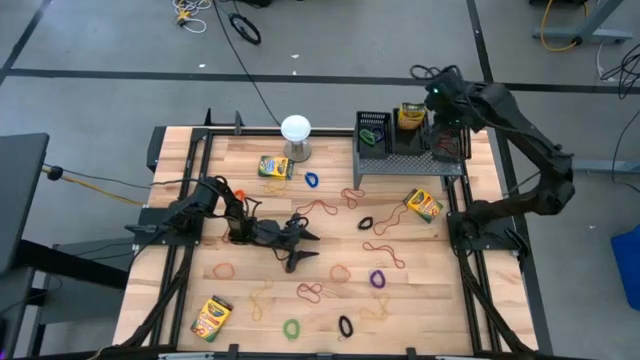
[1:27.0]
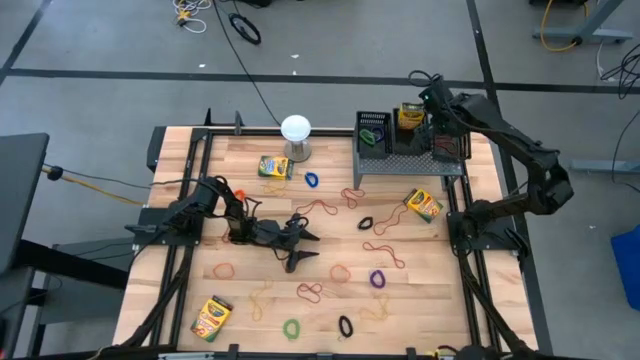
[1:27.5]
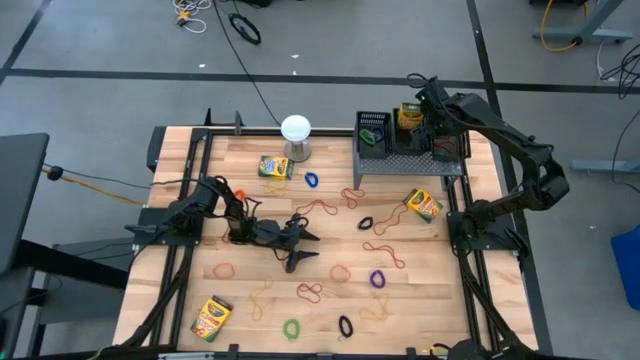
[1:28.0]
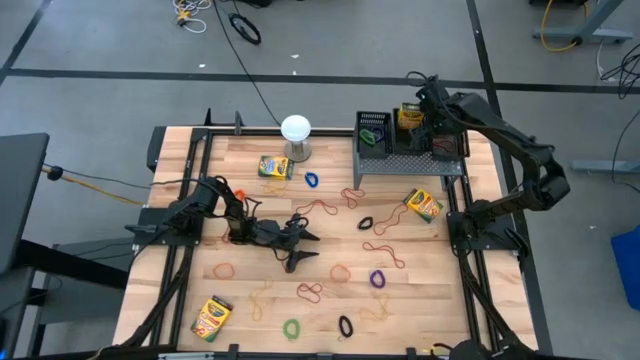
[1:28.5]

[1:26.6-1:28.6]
Task: Pick & Place Office Desk Supplies
Adjust the right black basket on the shelf

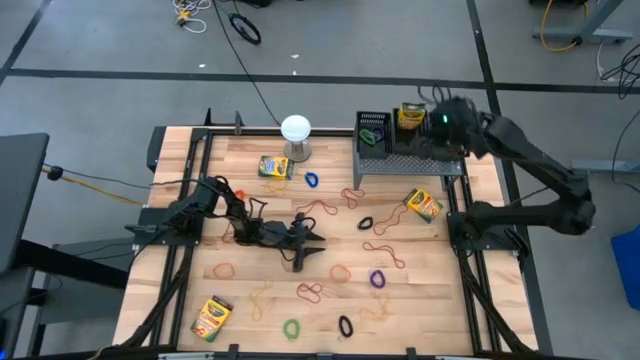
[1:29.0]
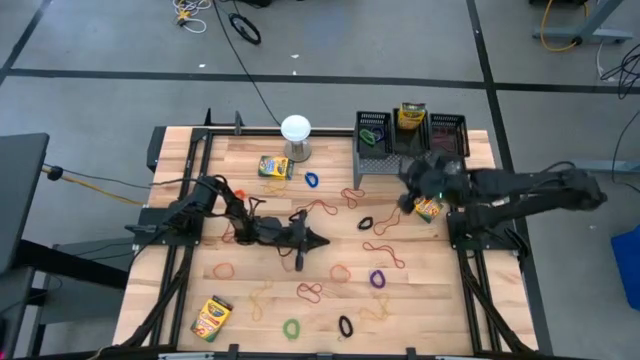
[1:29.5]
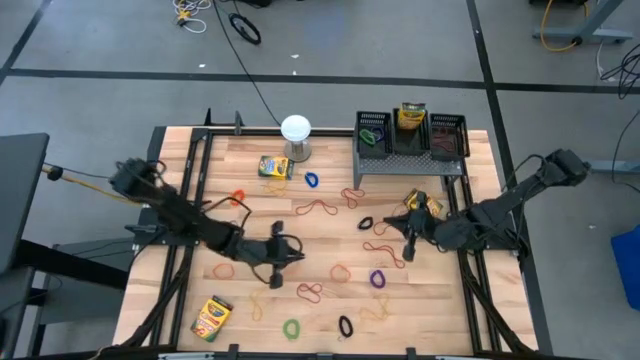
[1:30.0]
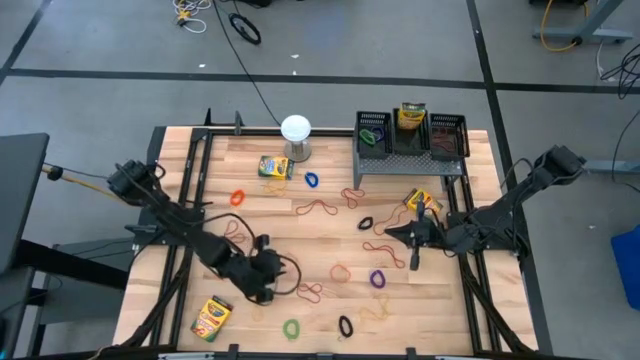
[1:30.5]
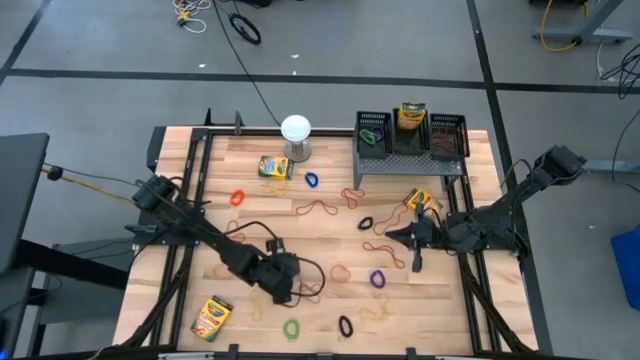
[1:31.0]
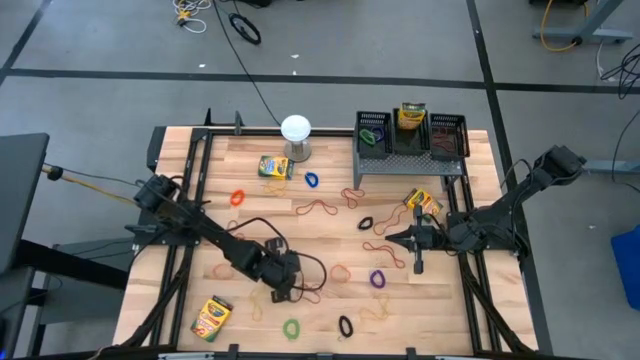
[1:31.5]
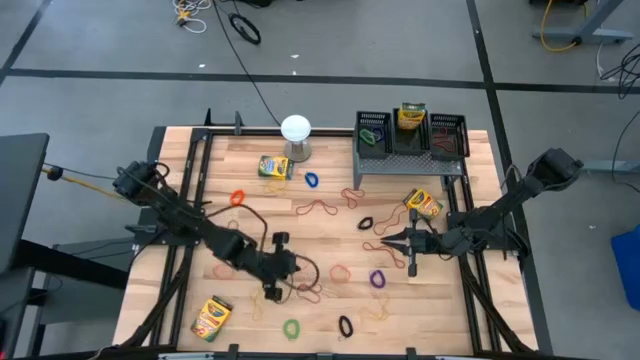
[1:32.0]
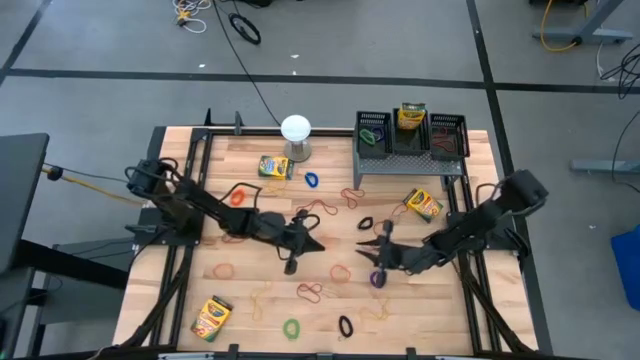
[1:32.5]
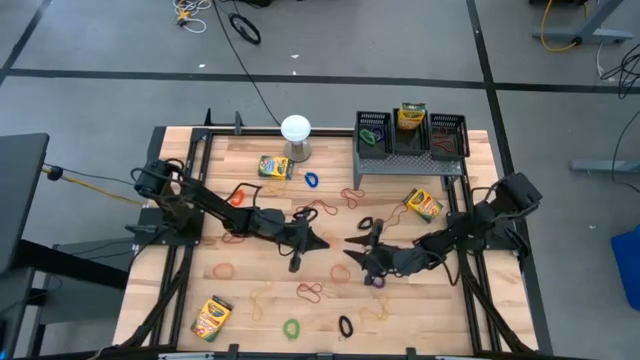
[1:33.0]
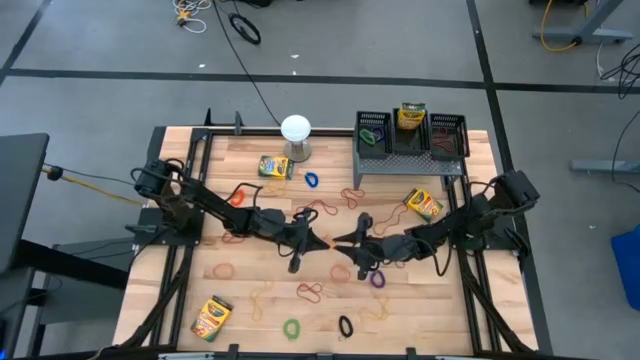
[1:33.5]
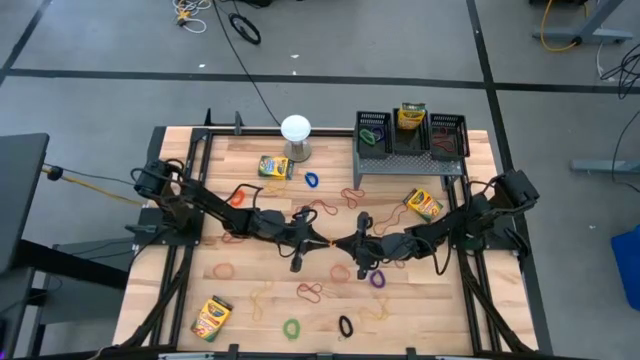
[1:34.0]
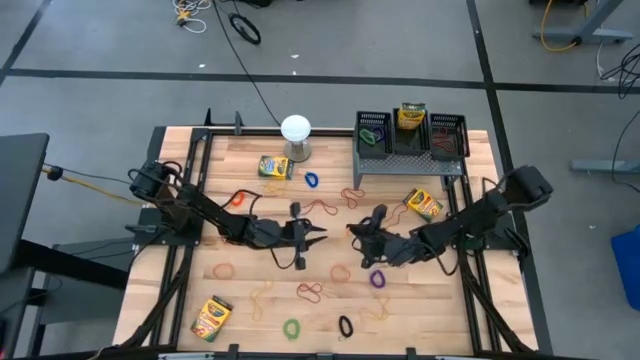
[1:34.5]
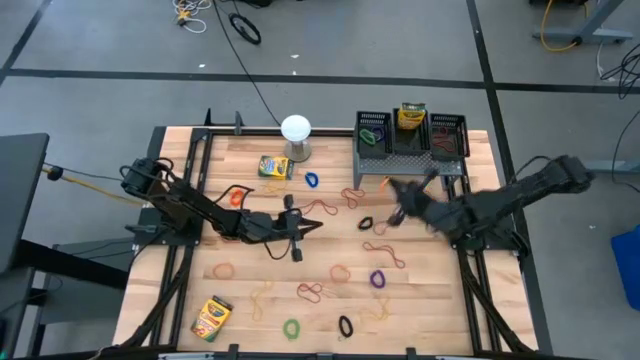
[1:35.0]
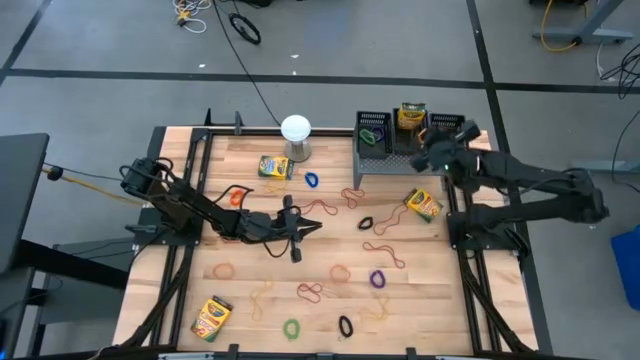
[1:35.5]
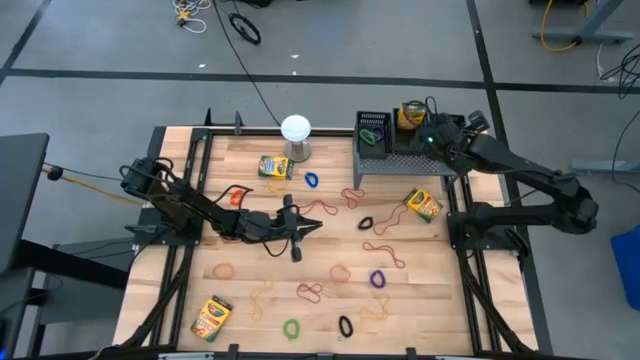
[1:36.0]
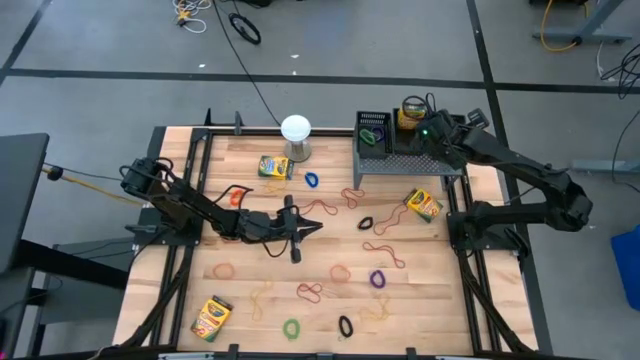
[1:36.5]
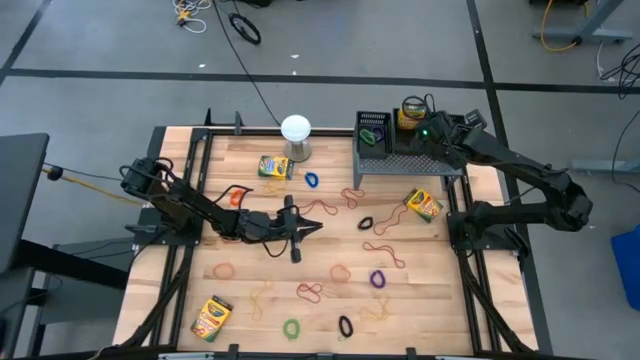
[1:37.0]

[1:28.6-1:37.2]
Put the orange rubberband into the right black basket on the shelf

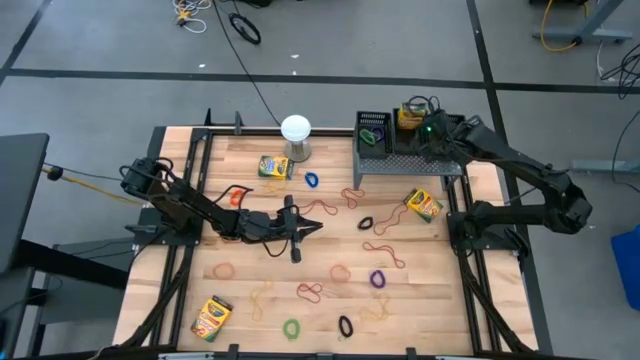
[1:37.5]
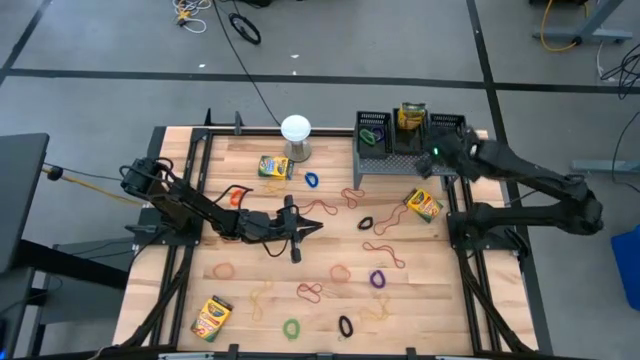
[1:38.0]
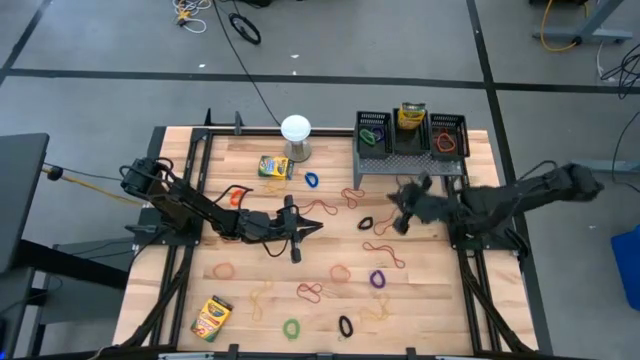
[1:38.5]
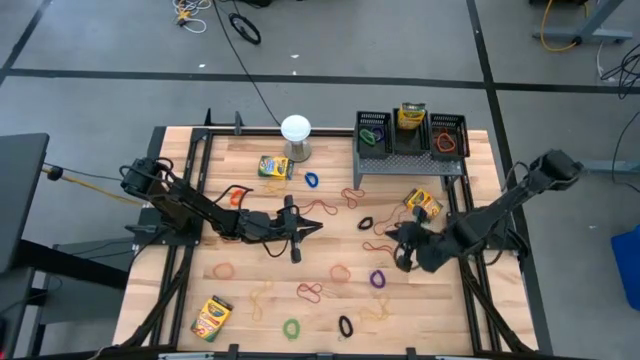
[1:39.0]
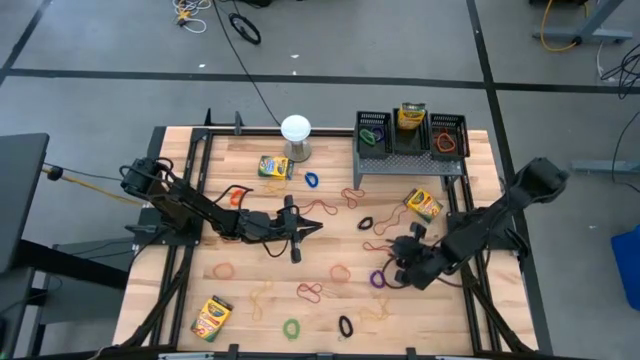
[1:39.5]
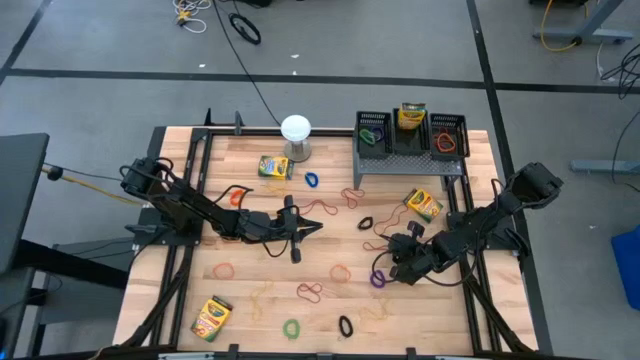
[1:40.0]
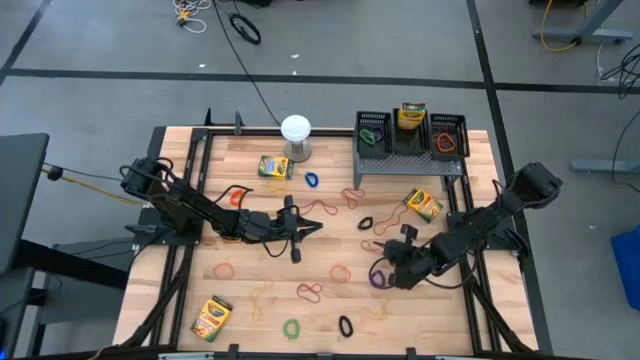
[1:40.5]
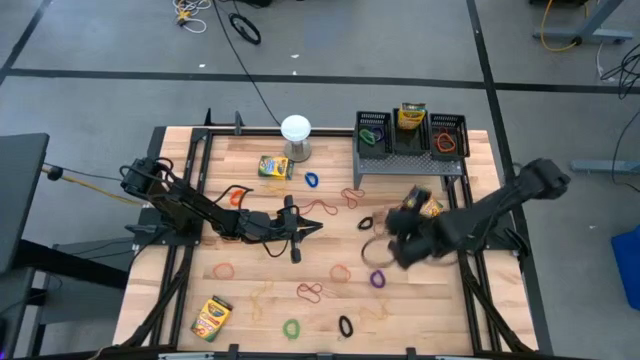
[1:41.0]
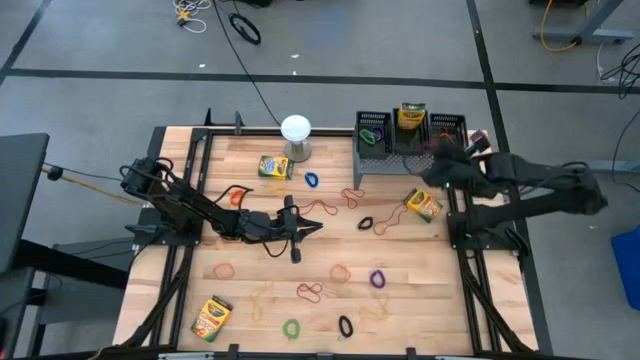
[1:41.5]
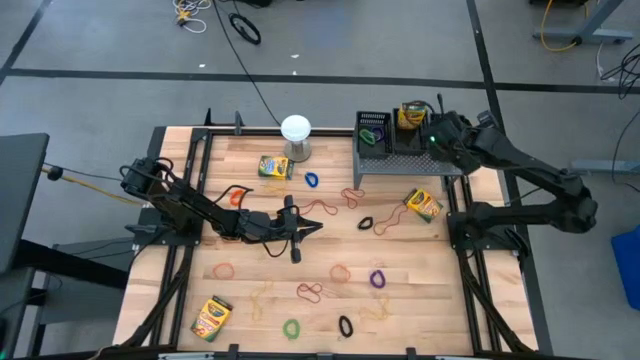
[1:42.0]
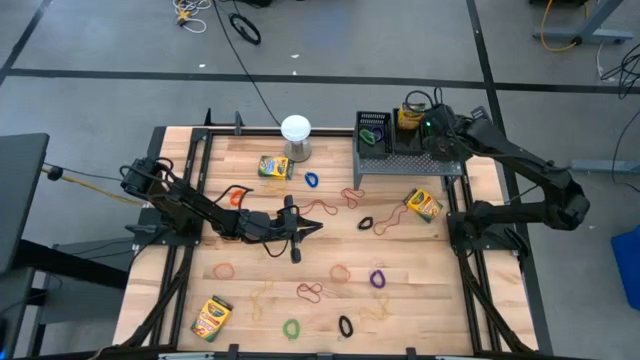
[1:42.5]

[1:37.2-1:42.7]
Put the red rubberband into the right black basket on the shelf

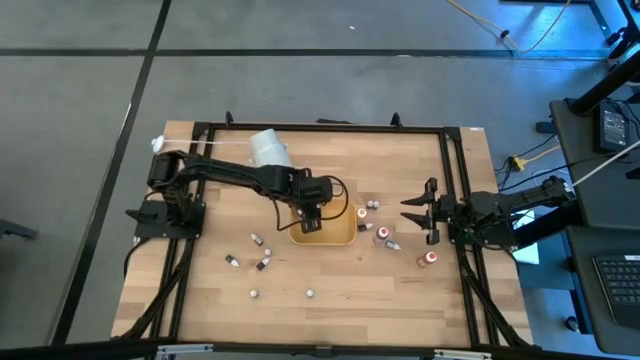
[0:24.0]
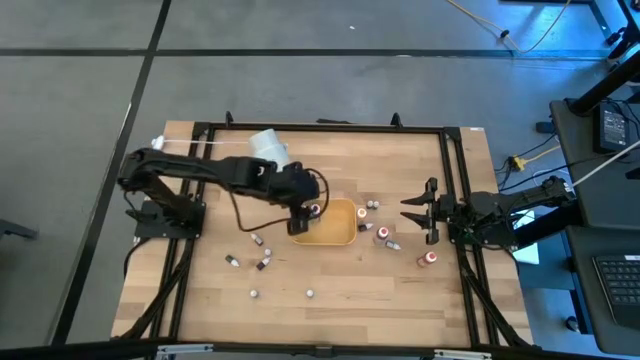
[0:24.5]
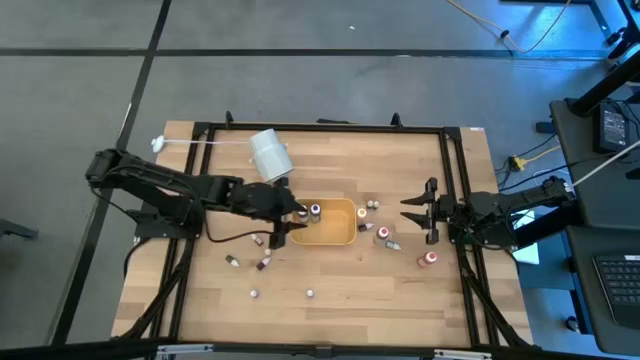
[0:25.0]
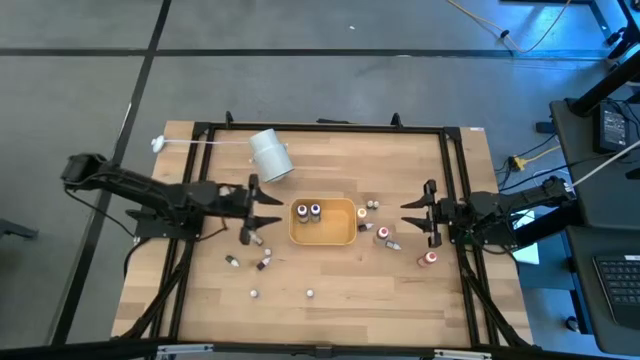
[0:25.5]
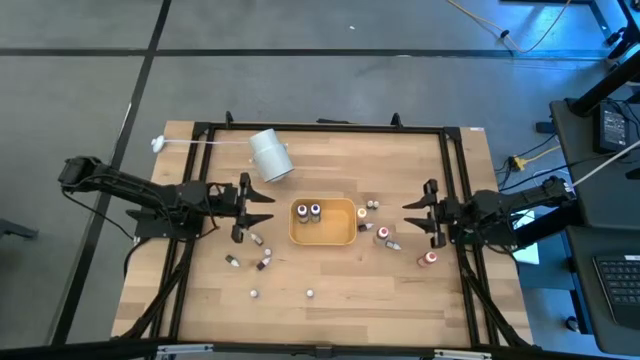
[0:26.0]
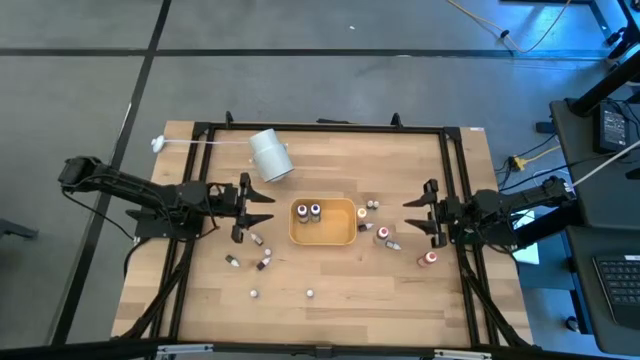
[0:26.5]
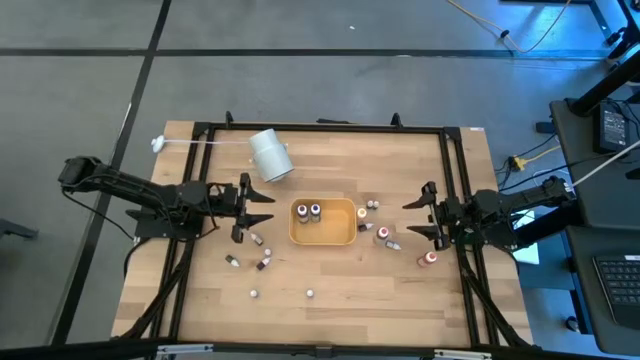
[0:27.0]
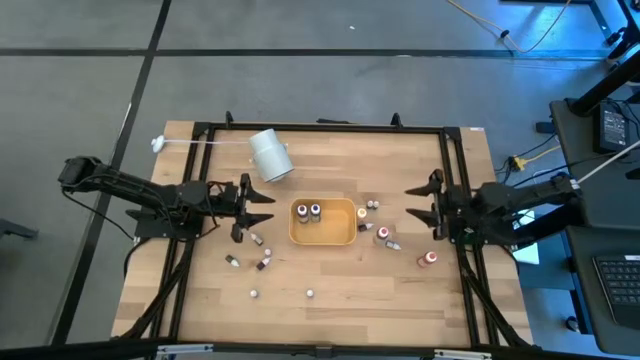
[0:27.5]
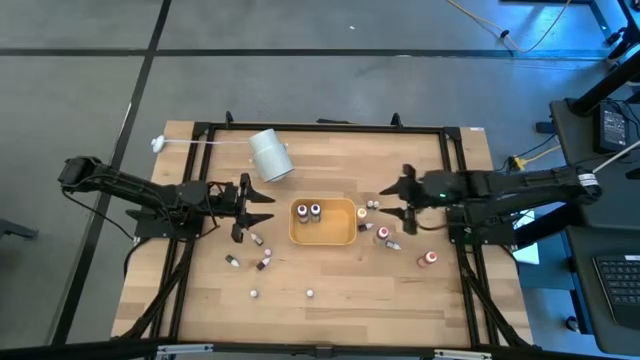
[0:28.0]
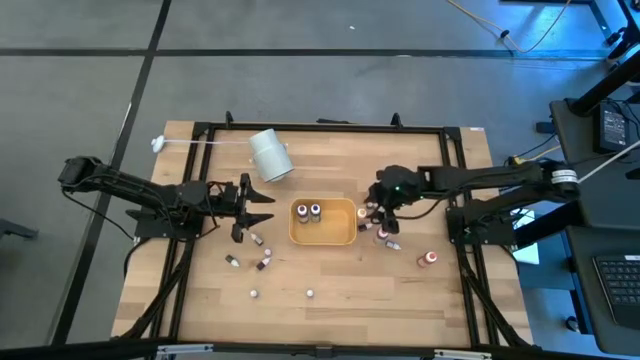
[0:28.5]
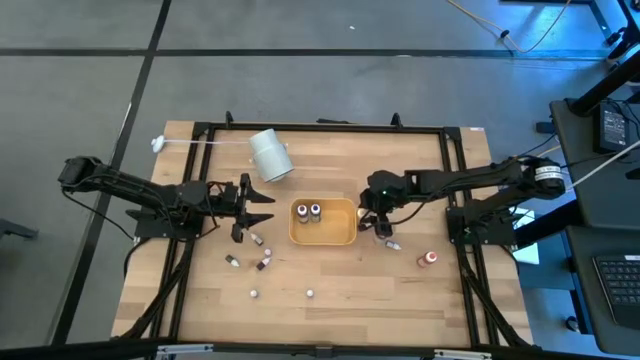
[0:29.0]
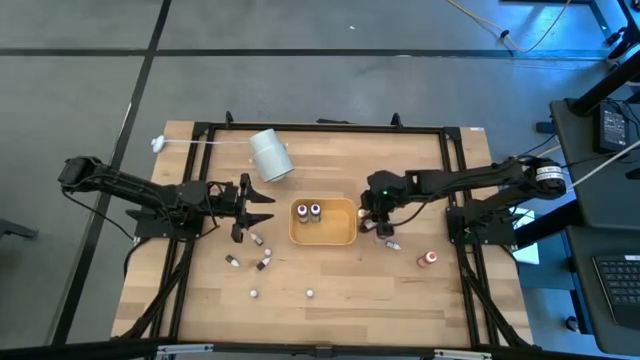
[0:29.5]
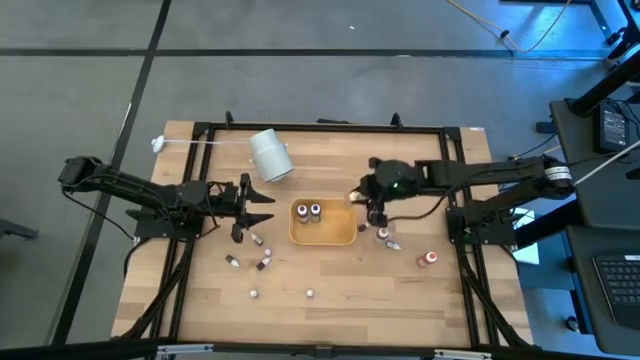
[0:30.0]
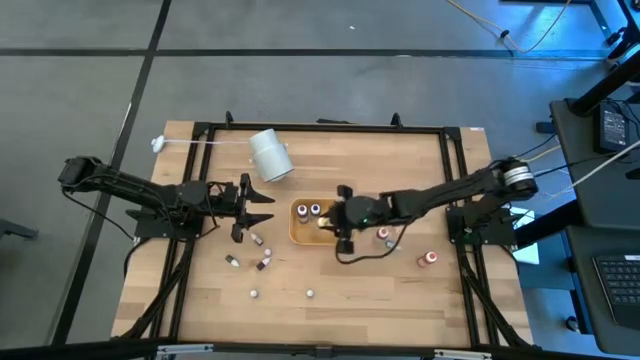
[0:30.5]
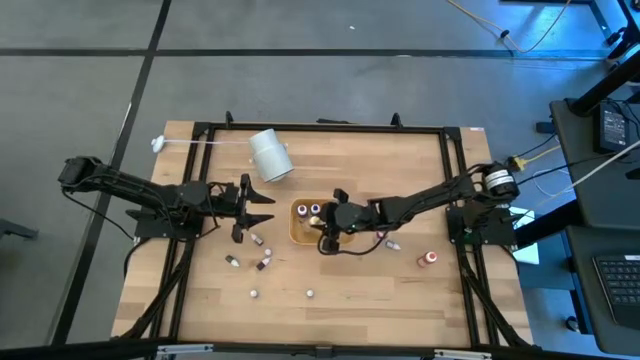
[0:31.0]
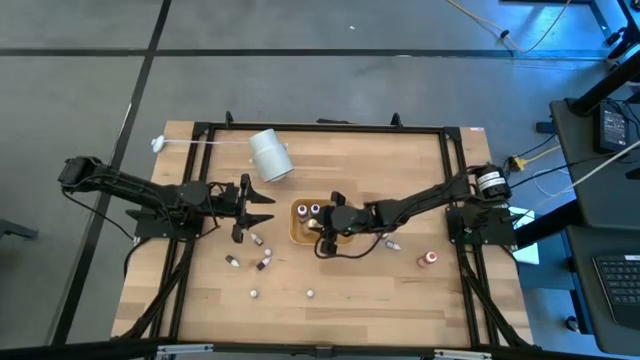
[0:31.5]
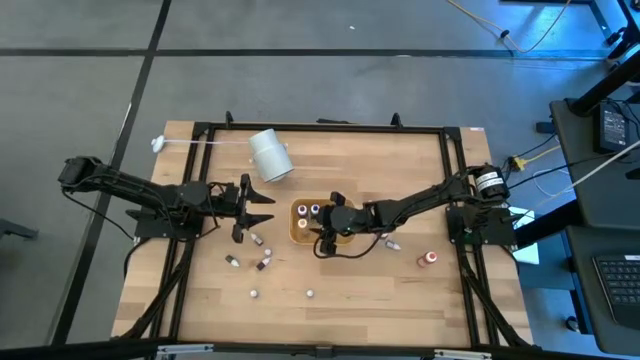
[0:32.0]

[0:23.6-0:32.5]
Task: Pick & Place food coloring
Put the large yellow ink bottle into the yellow bin
